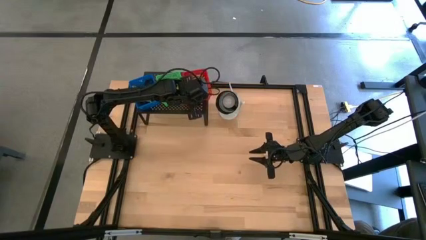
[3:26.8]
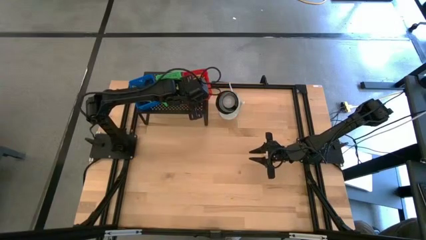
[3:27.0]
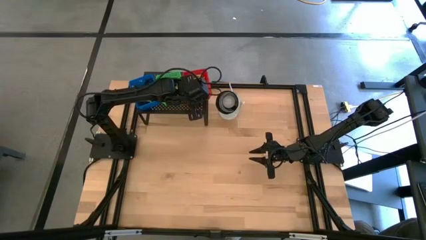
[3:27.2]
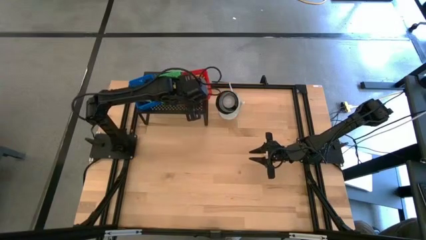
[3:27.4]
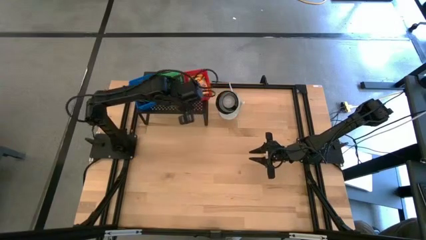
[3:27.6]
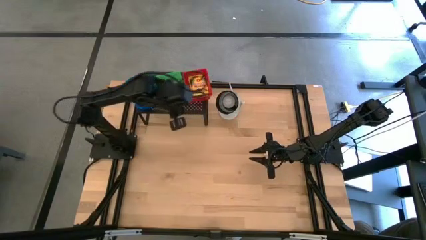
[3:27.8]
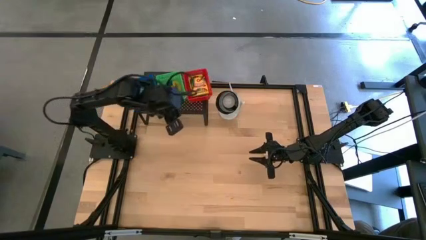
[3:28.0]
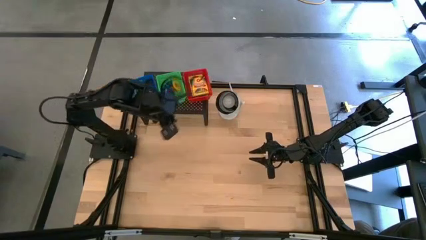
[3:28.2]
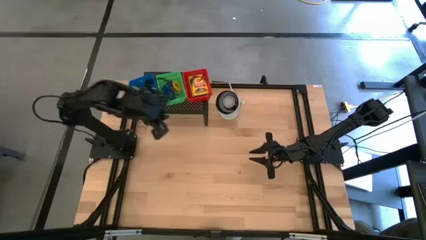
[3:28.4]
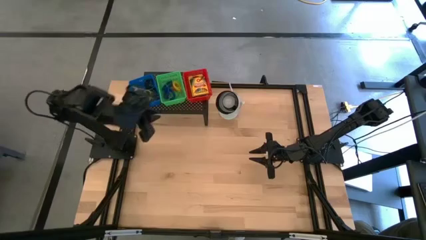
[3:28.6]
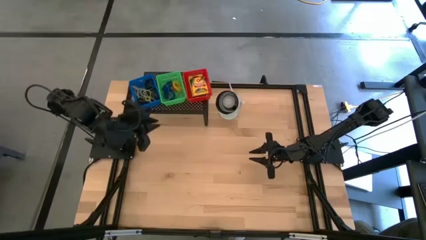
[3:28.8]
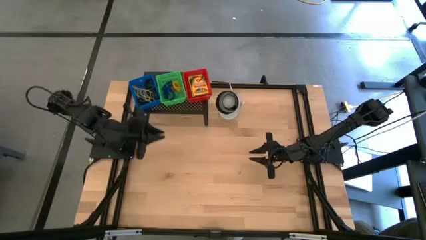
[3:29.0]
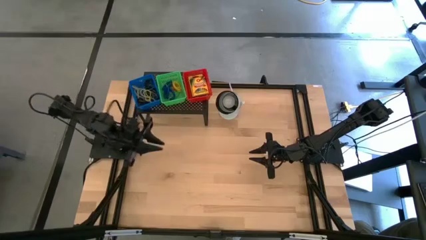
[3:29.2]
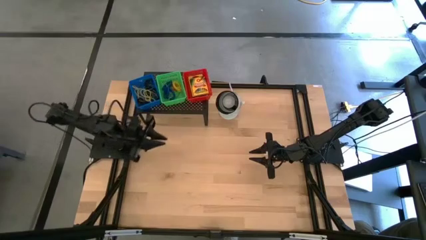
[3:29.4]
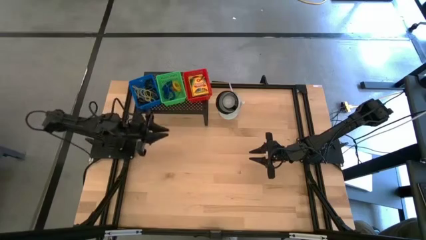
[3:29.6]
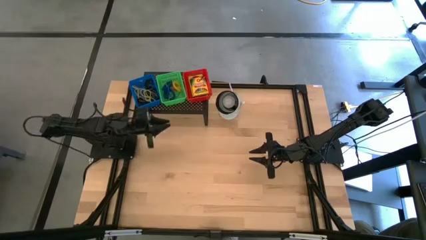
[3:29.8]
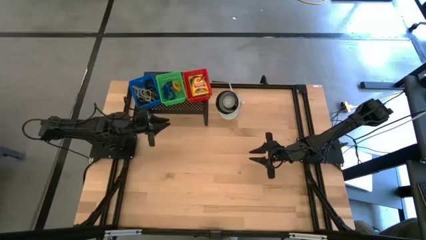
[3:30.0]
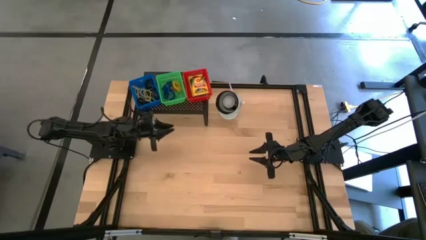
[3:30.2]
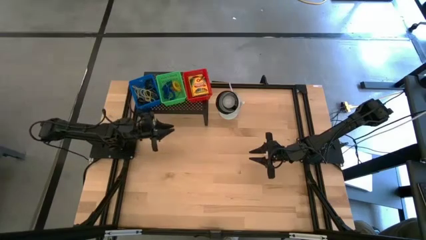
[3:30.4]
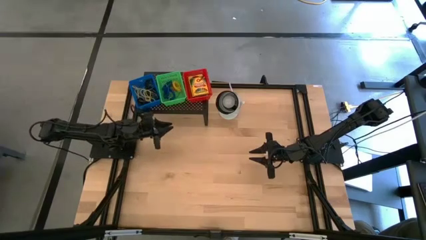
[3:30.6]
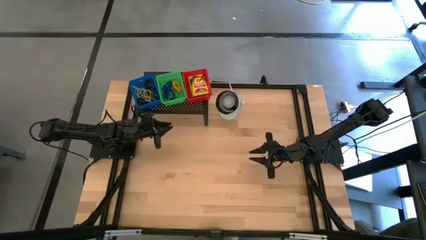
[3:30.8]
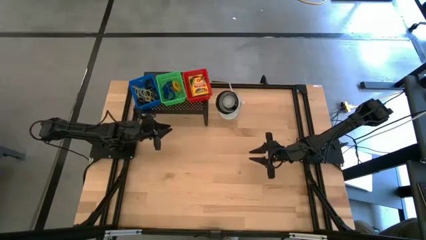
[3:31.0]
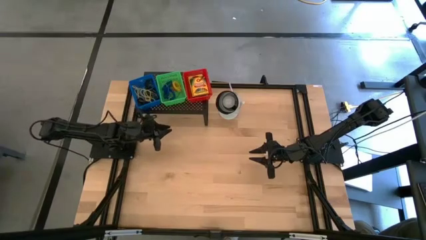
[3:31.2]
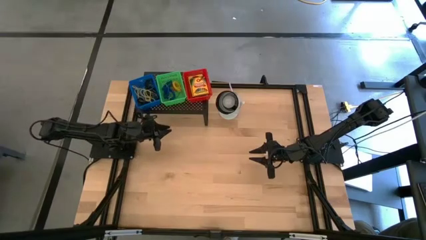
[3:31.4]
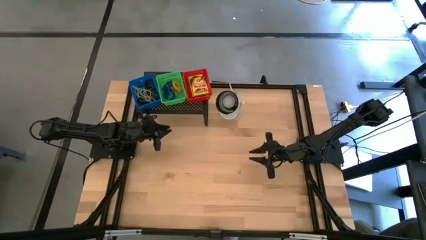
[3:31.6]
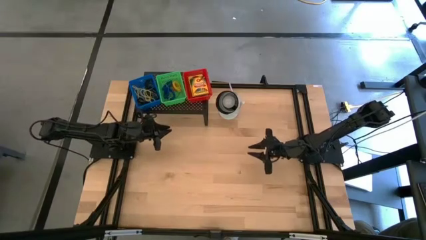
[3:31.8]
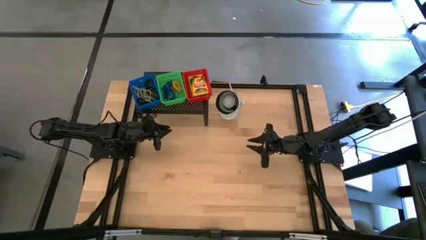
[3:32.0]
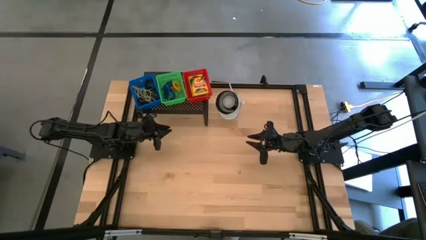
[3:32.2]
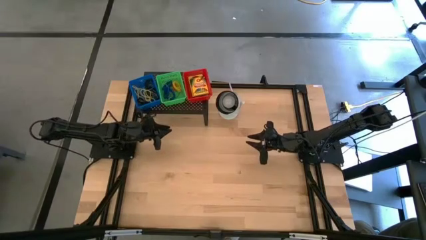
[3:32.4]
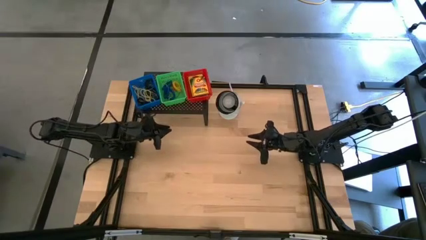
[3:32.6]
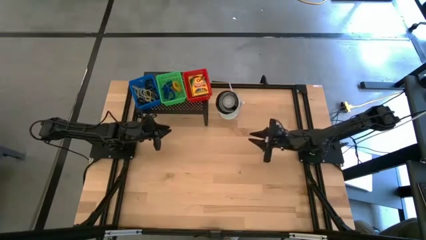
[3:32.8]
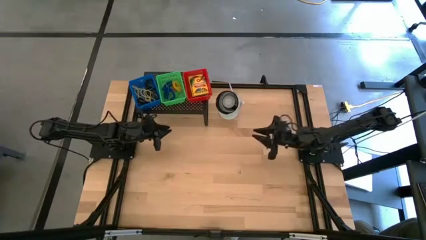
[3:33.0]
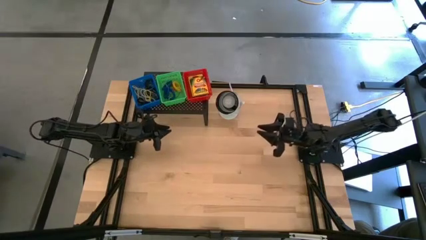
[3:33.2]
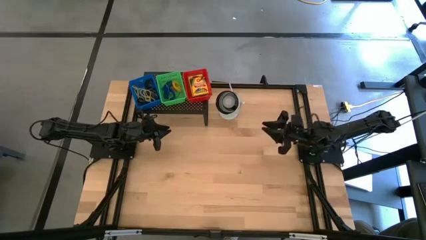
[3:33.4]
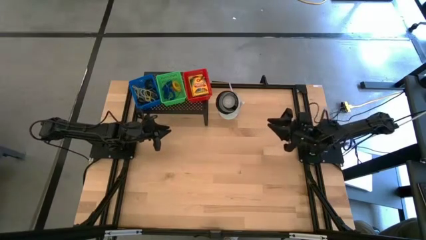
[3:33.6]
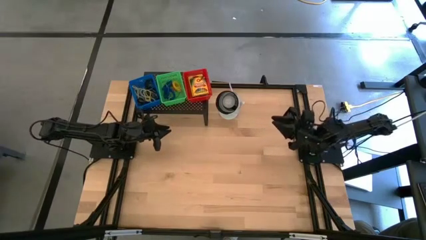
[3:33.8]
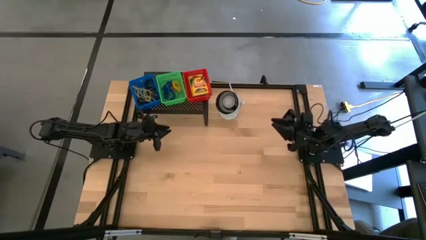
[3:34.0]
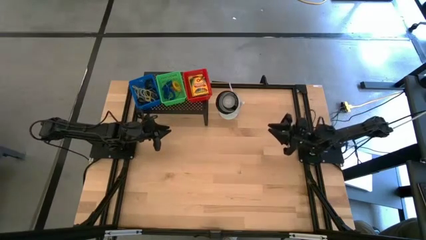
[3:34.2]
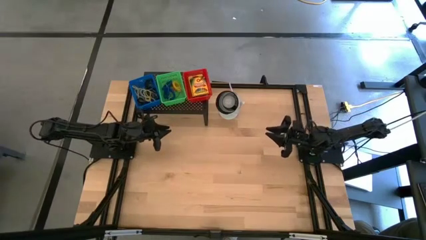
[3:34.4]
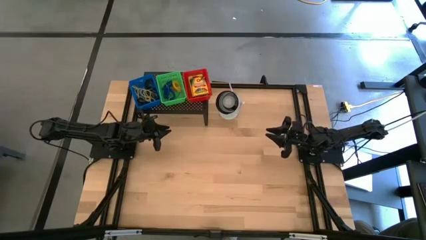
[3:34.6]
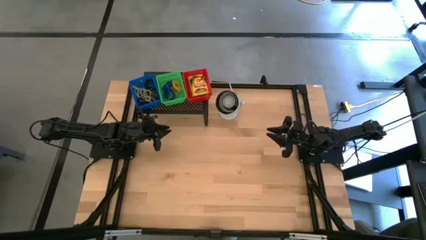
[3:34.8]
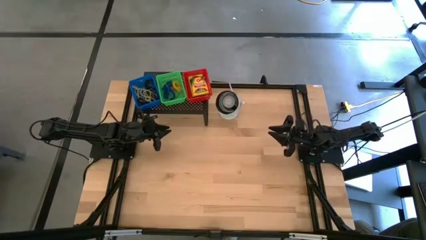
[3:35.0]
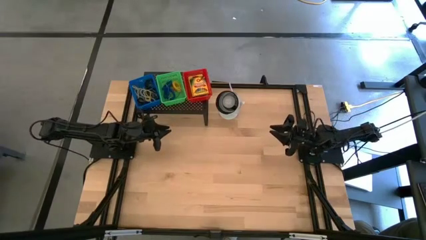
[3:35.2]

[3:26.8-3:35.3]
Task: Pick & Place Office Desk Supplies
Return to Home Position

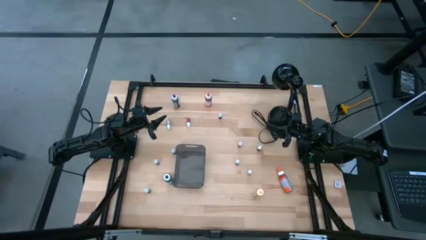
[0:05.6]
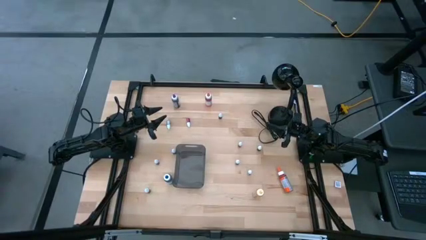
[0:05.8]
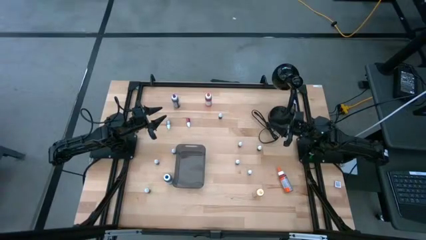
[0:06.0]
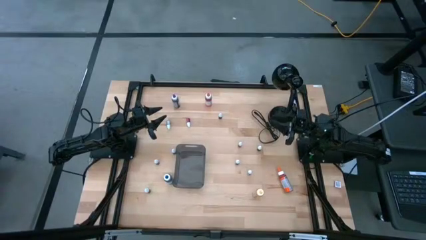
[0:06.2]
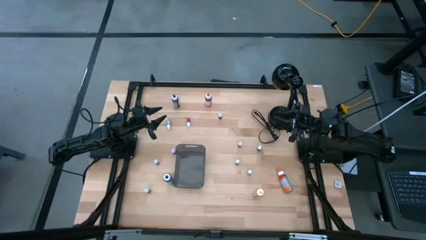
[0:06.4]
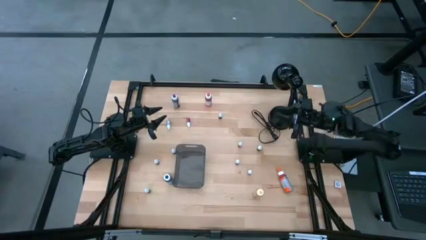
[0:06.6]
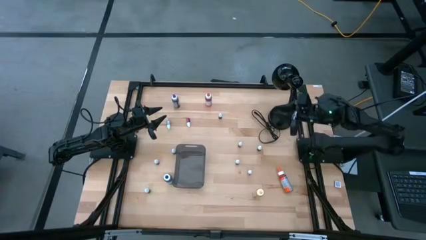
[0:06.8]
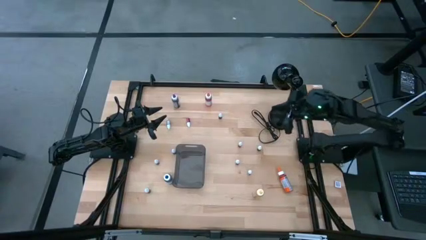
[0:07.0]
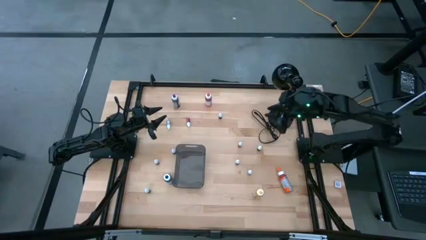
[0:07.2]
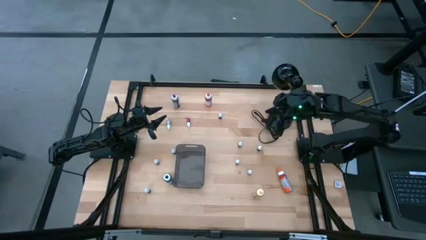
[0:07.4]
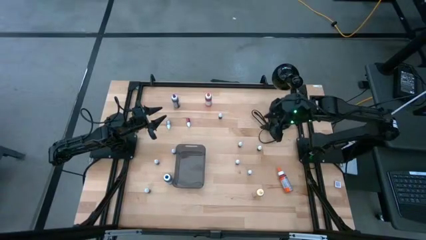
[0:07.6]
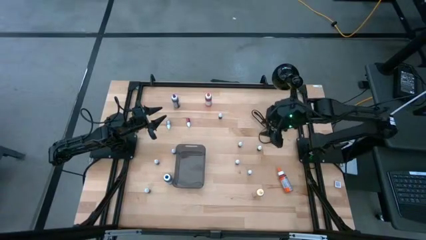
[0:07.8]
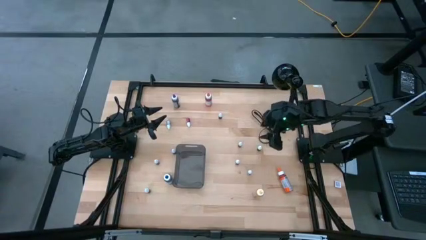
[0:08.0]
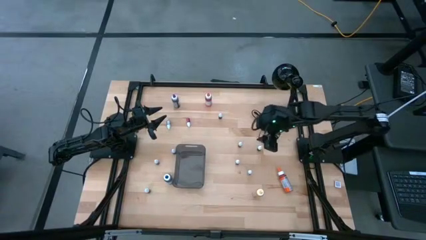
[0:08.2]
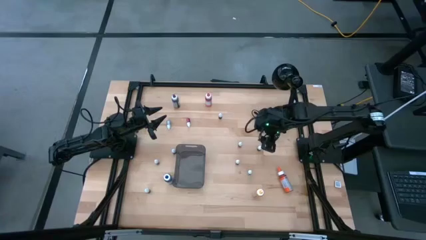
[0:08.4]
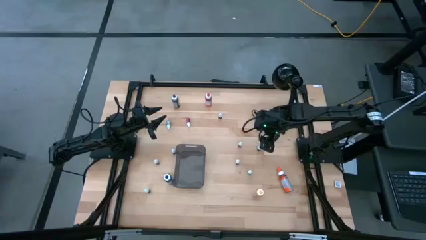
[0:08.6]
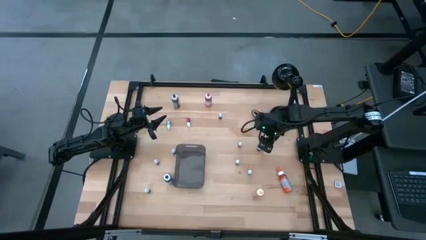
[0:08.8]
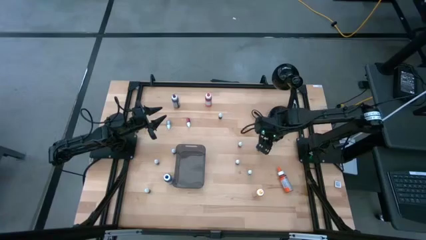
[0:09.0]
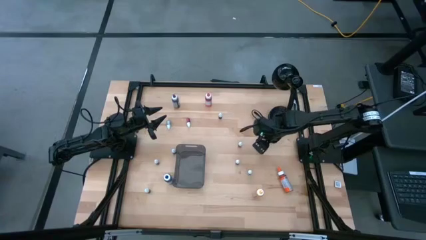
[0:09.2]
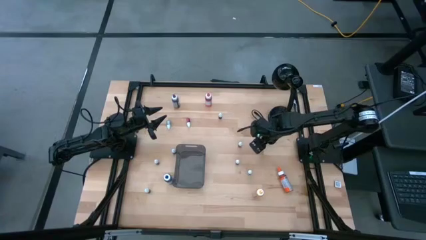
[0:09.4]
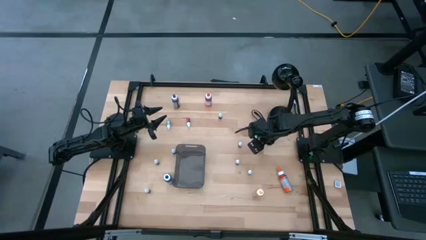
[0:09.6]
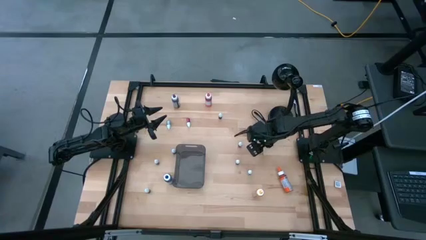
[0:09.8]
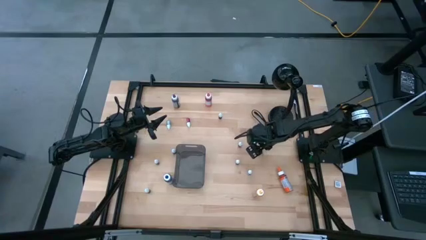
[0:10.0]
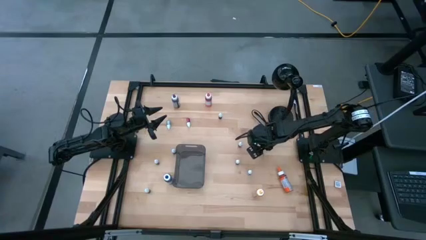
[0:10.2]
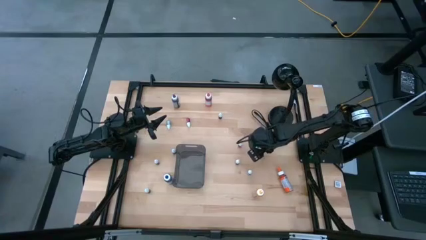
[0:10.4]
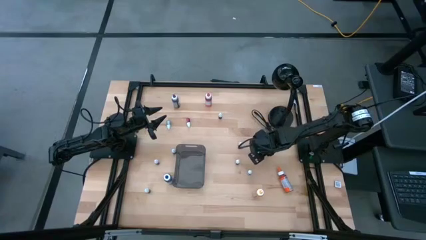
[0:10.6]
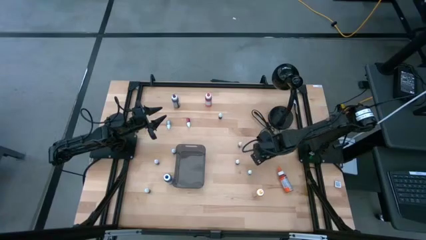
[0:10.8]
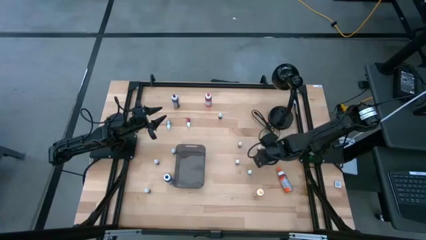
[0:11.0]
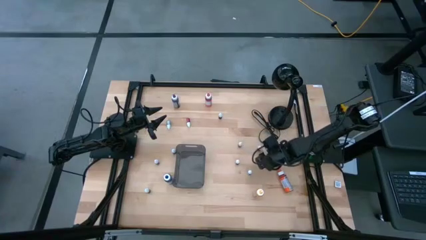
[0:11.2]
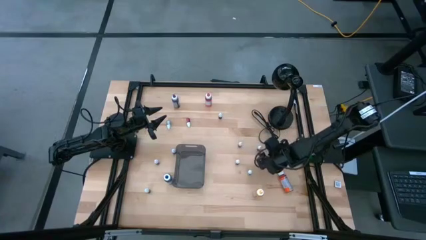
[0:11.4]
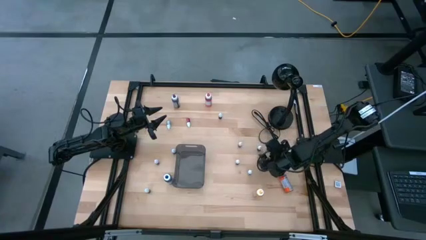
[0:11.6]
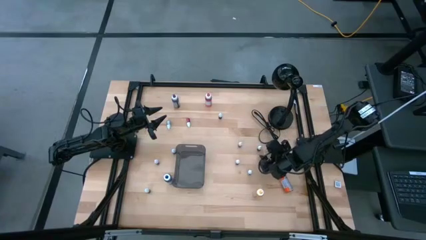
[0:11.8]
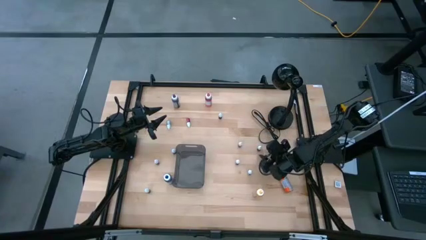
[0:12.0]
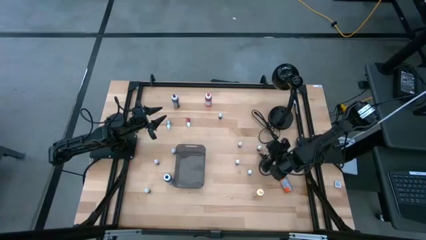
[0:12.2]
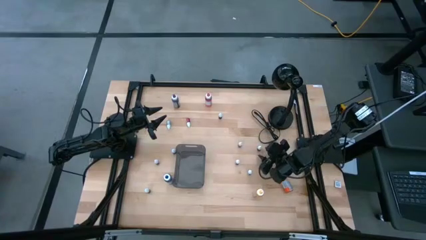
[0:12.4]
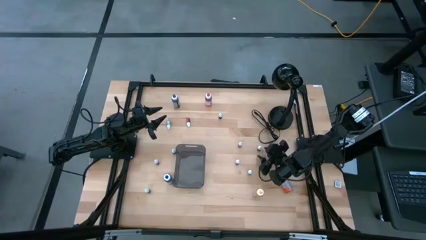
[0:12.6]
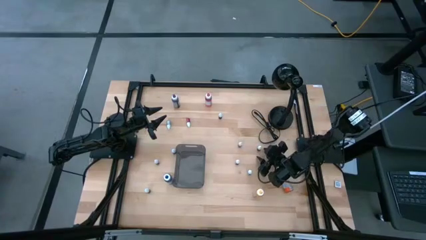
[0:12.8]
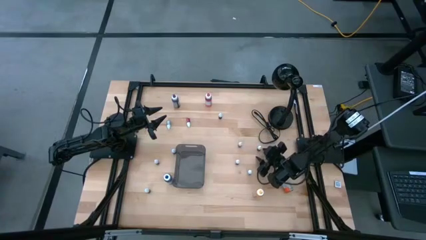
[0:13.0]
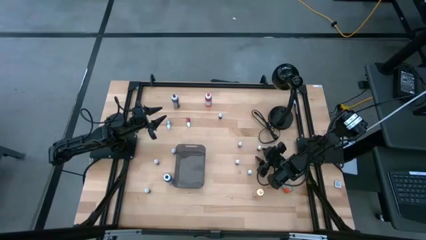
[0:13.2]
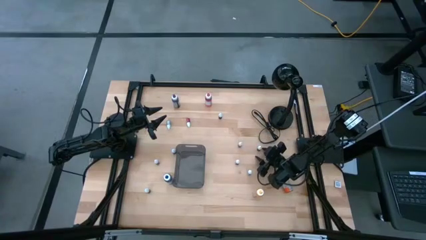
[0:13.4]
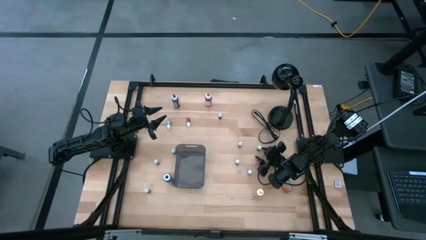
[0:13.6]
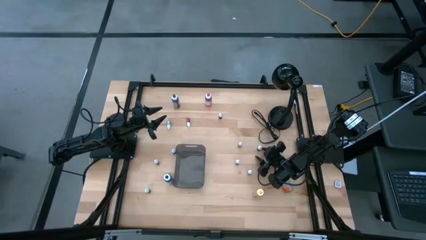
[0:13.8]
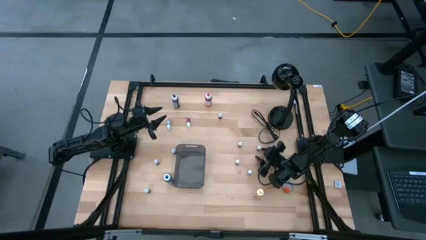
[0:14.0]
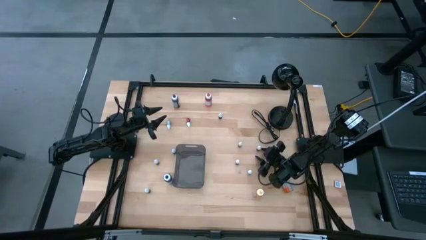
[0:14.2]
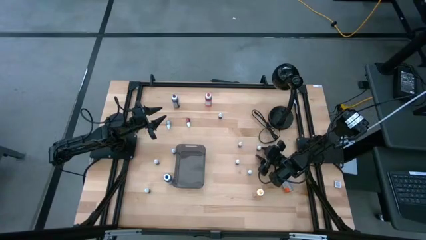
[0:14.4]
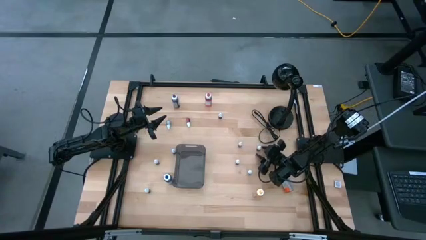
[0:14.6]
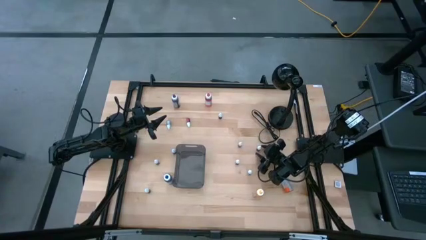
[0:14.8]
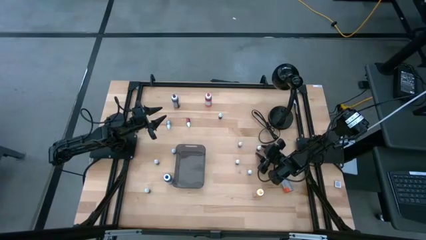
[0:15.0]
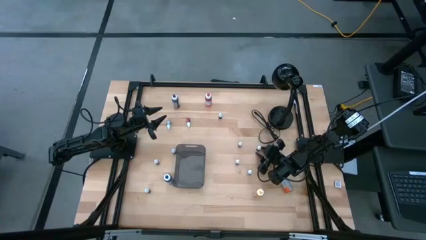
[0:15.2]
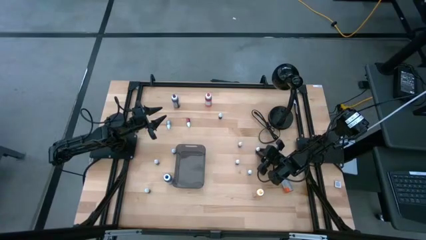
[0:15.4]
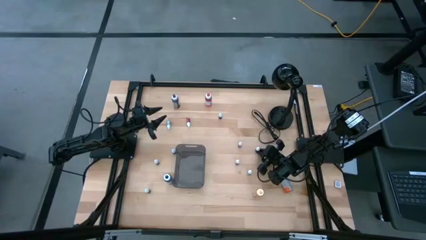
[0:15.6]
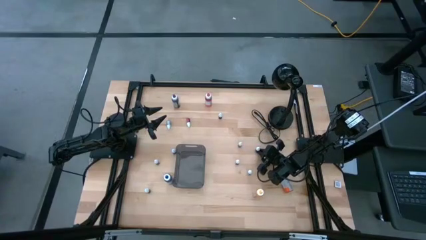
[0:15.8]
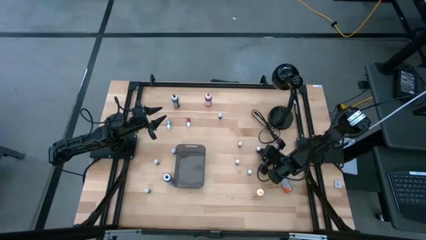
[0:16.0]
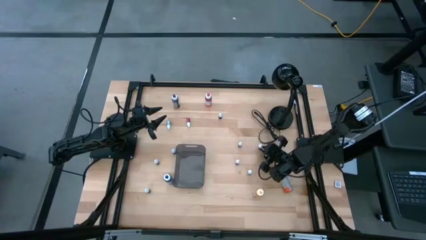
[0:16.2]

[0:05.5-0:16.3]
Task: Pick & Place food coloring
Put the green food coloring bottle into the bin
